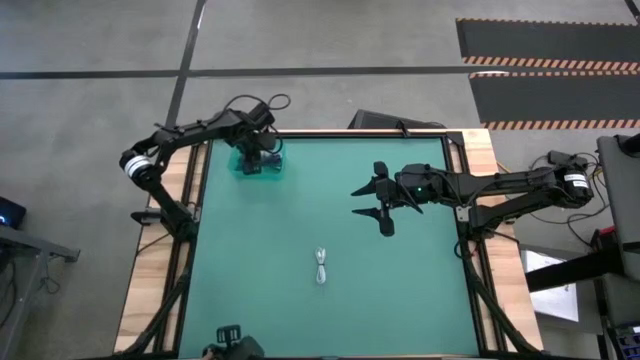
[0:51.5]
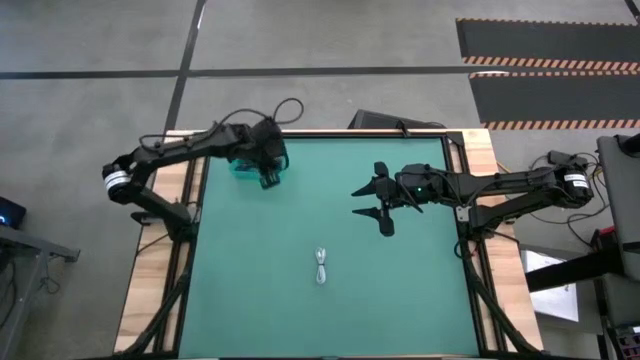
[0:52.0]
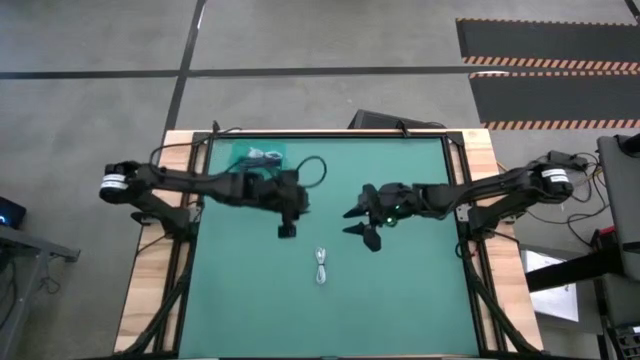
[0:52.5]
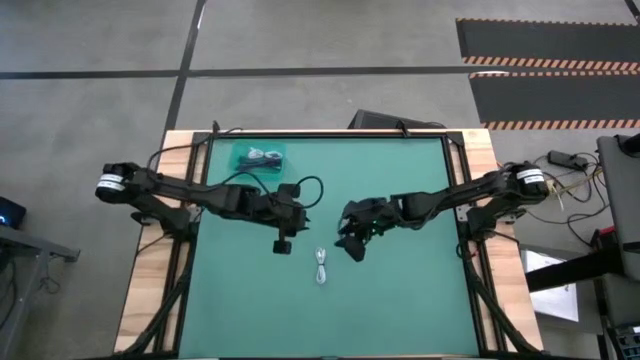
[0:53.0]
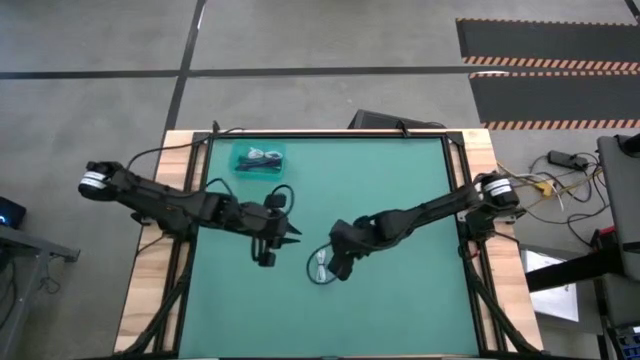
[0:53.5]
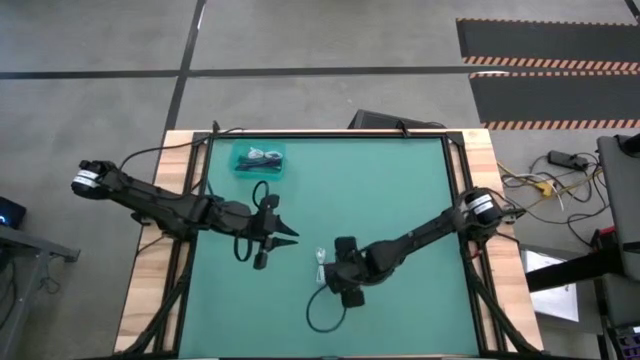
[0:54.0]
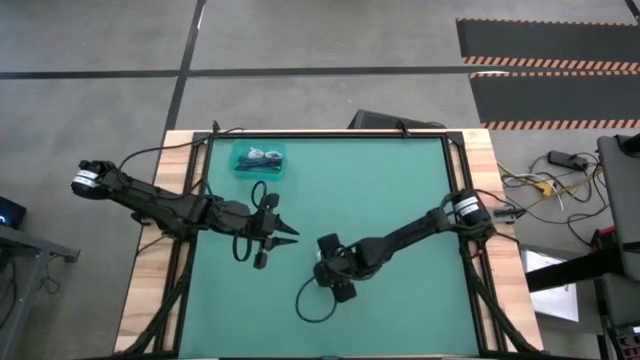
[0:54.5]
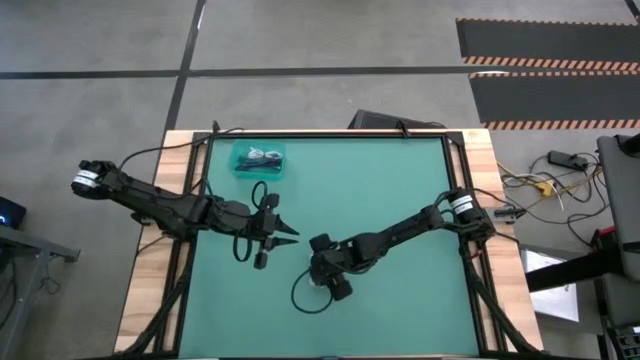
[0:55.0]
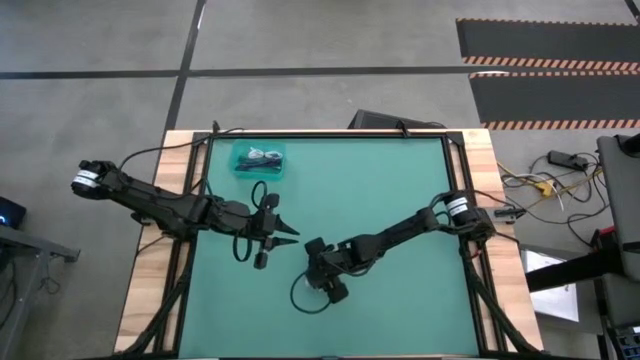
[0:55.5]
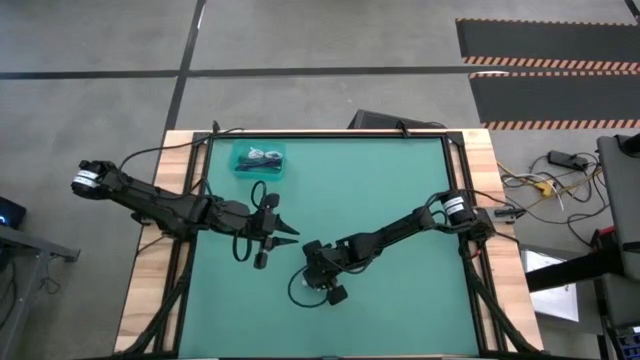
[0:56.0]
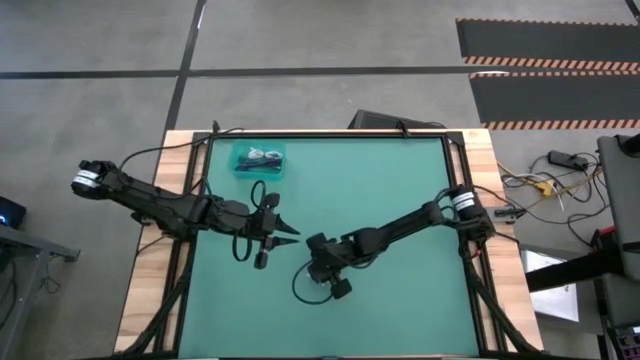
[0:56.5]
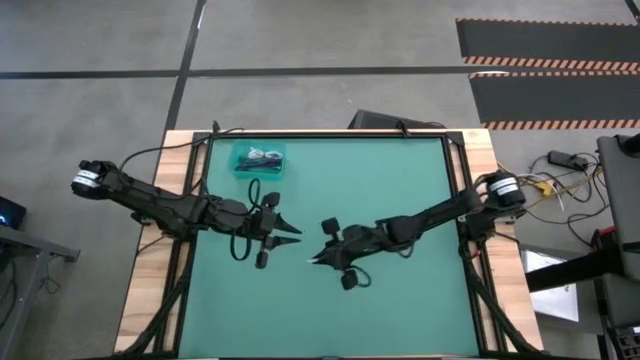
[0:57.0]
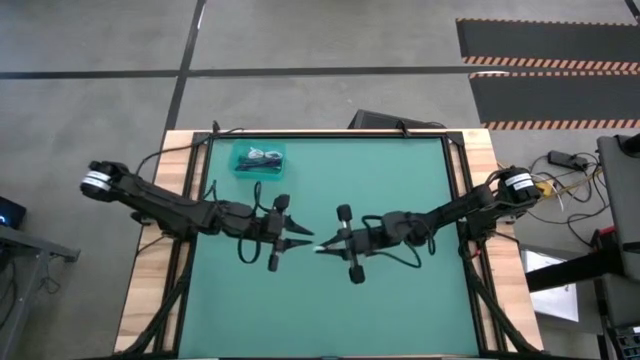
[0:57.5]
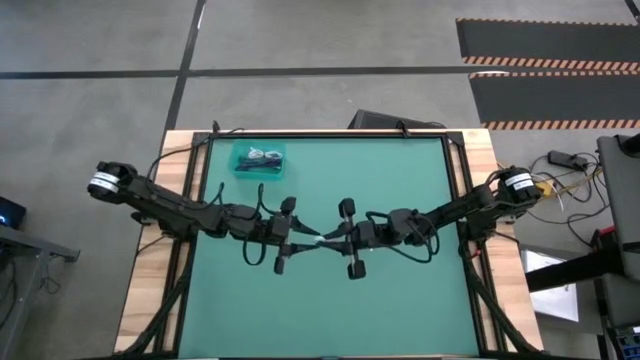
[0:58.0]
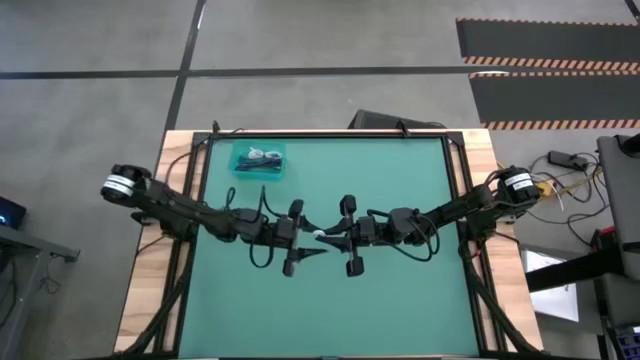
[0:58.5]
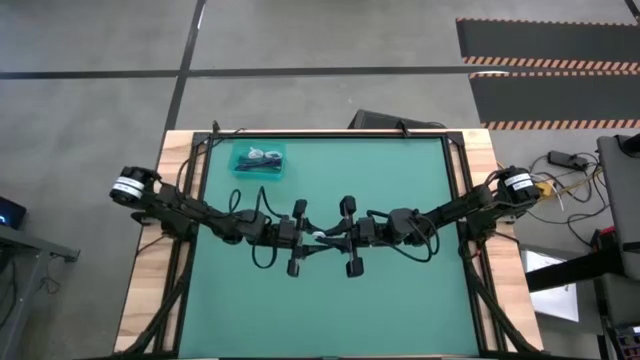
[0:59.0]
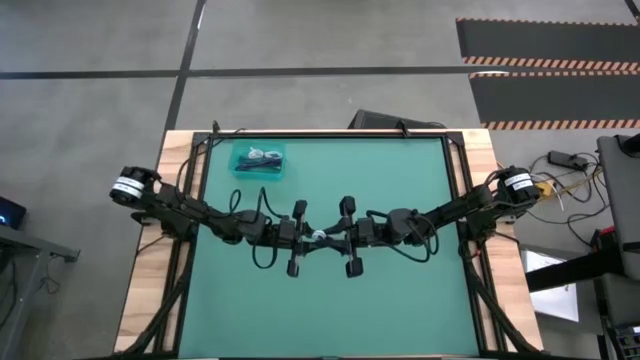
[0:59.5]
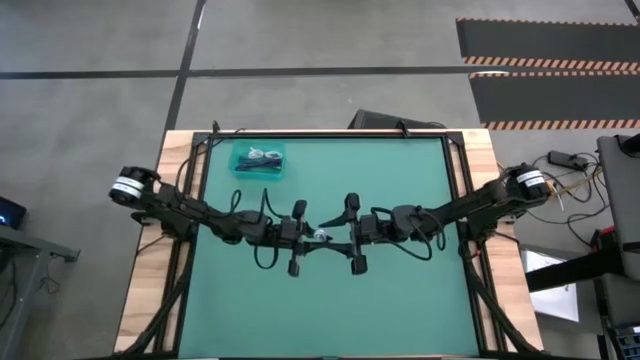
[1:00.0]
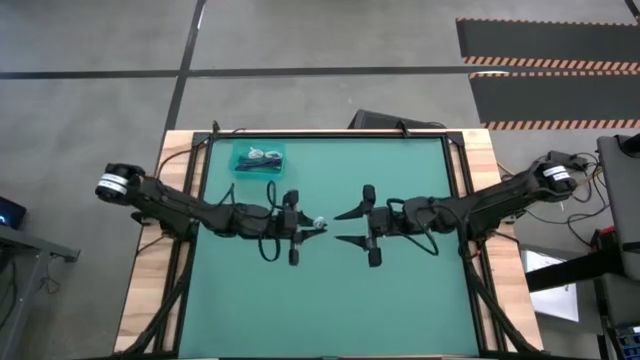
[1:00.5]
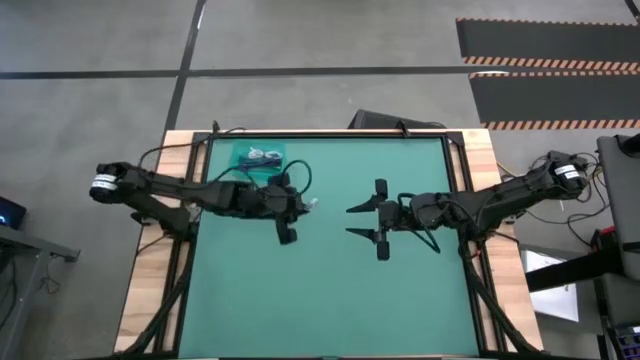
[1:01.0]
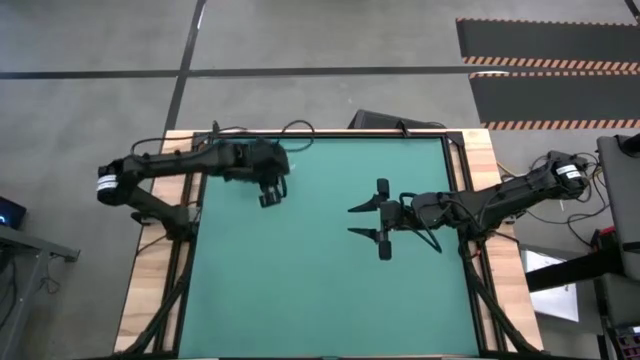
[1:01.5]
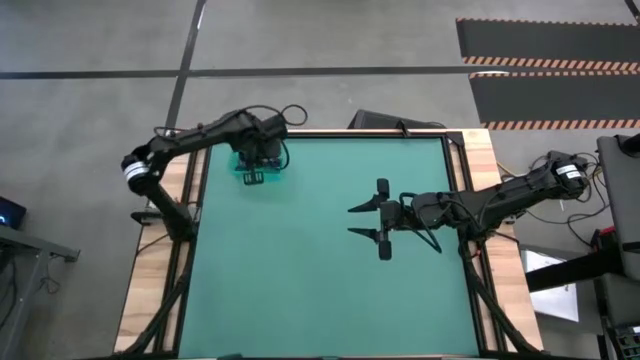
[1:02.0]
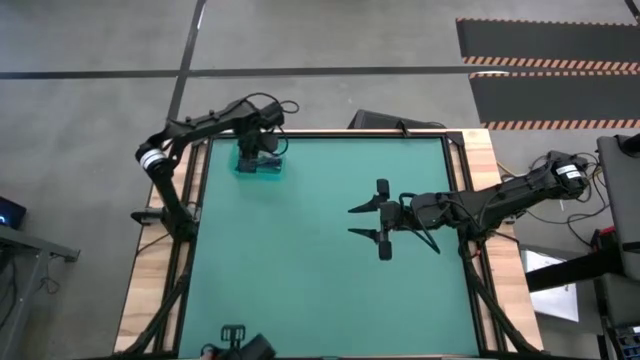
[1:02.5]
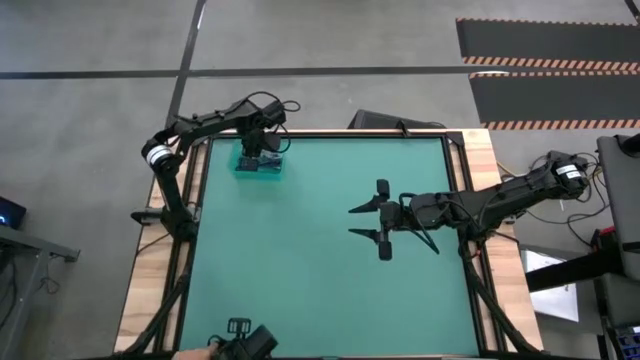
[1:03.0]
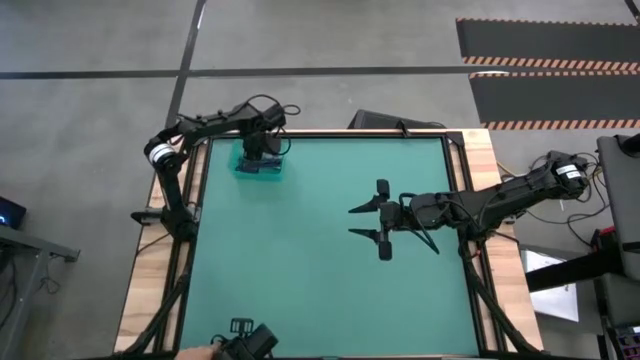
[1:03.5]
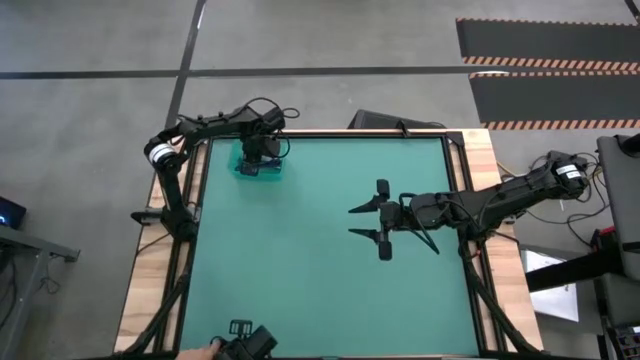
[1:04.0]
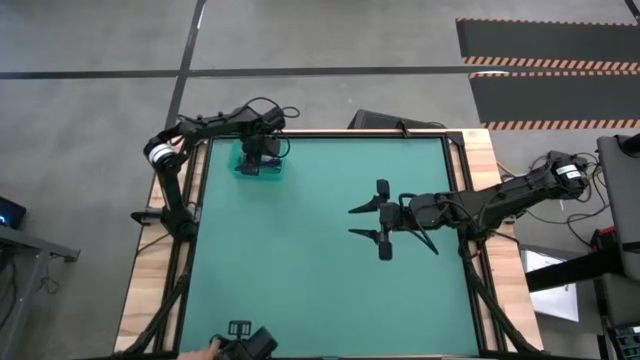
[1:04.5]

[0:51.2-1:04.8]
Task: Pick and place USB-C Cables
Put the white USB cable into the blue bin

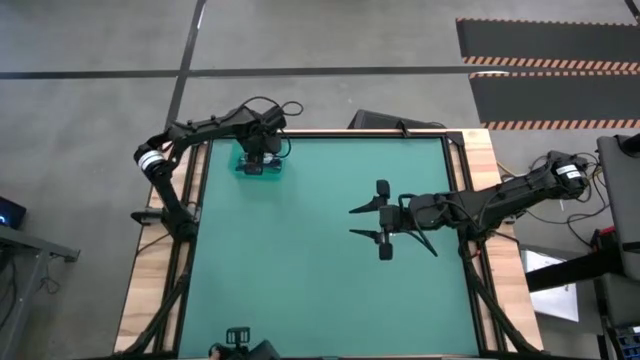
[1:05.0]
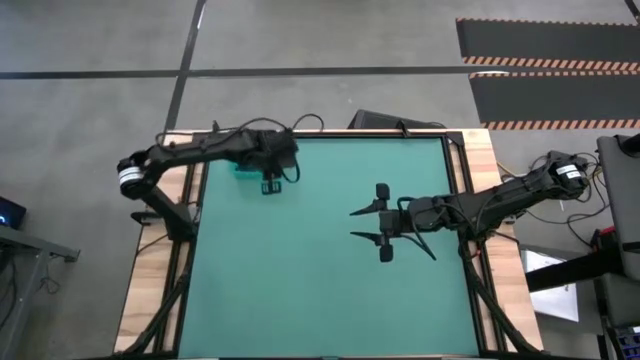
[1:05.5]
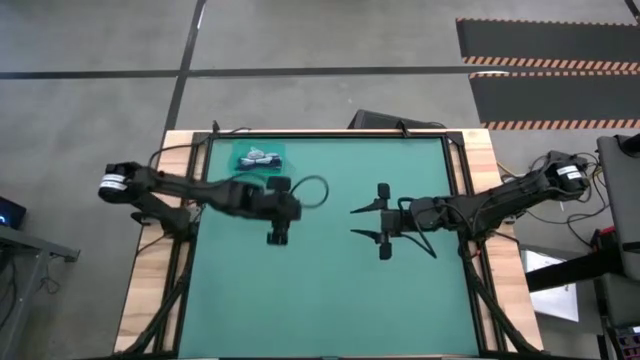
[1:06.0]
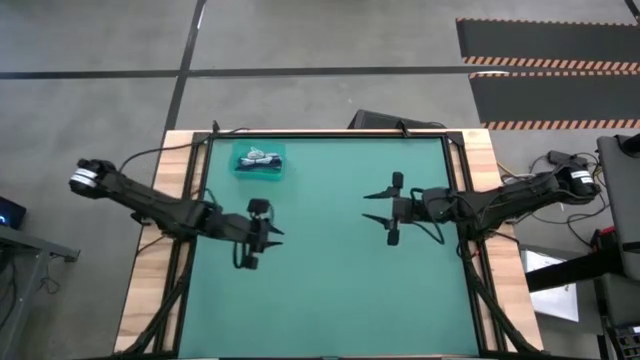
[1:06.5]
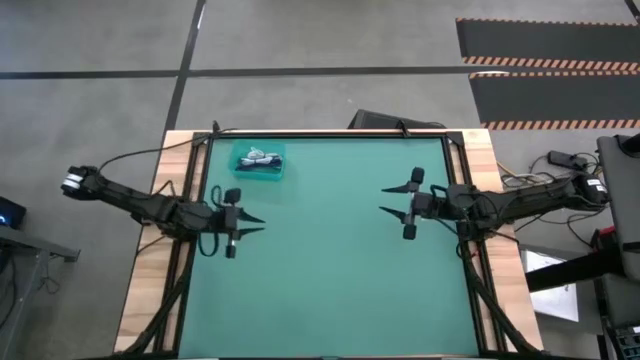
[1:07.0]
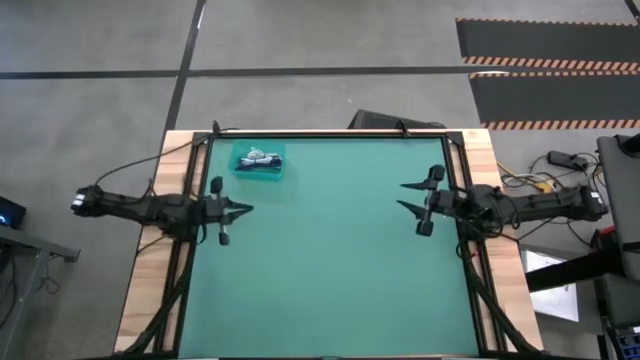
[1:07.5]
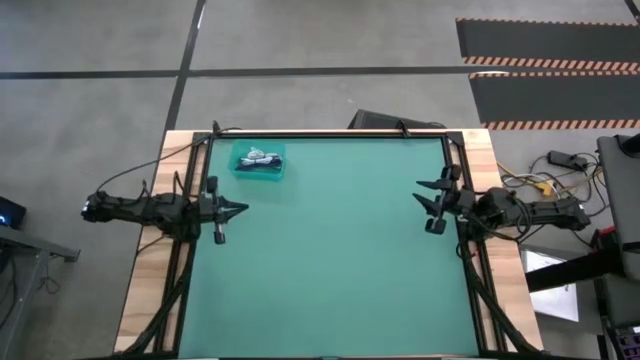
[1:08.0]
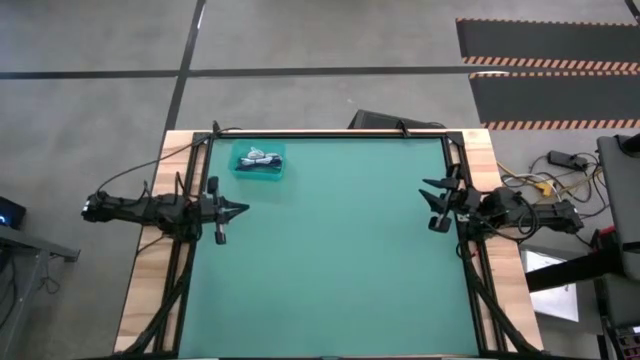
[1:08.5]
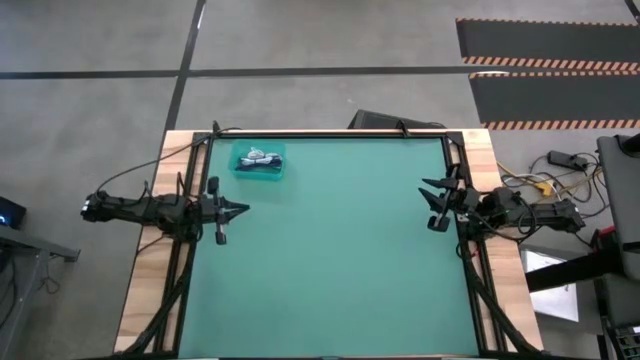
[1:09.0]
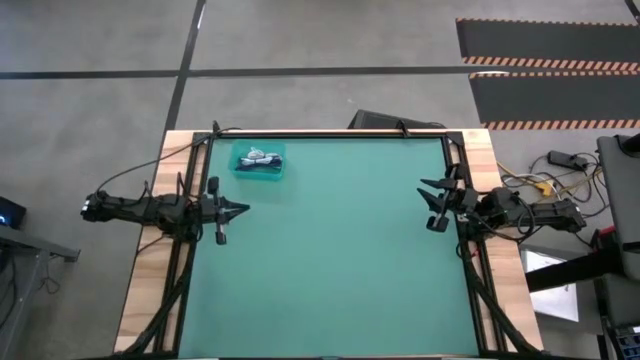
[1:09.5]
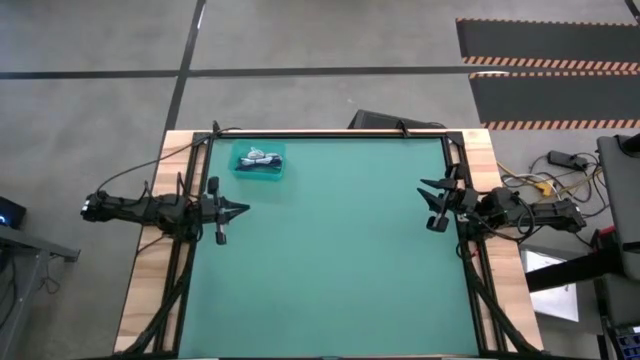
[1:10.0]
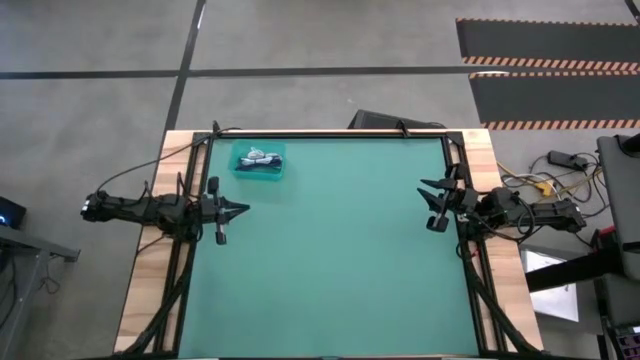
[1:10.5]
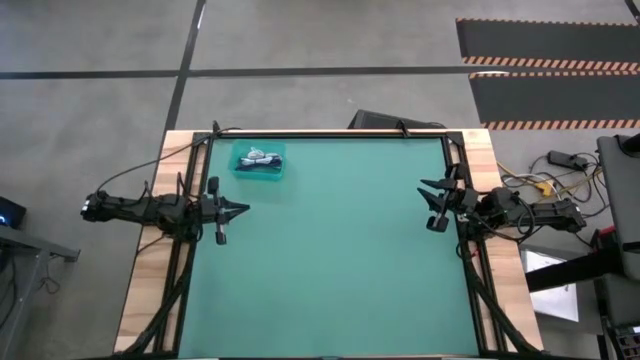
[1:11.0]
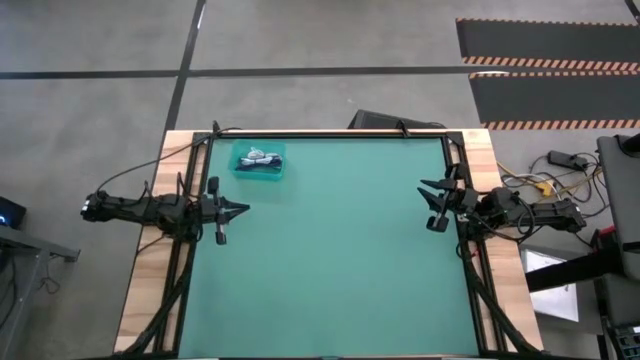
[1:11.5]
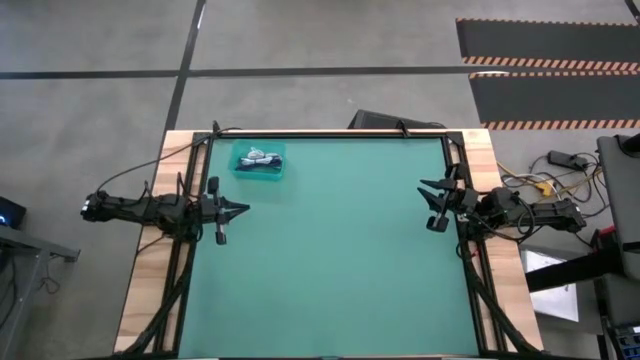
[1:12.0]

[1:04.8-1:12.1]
Return to Home Position
